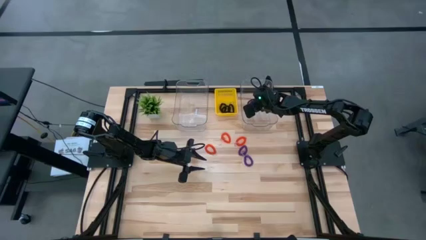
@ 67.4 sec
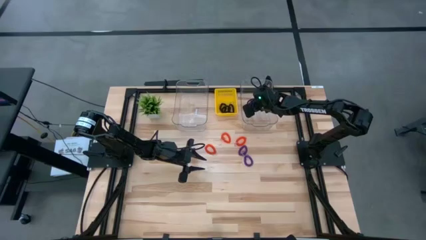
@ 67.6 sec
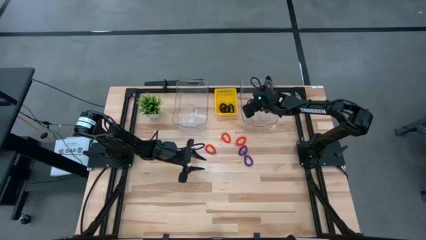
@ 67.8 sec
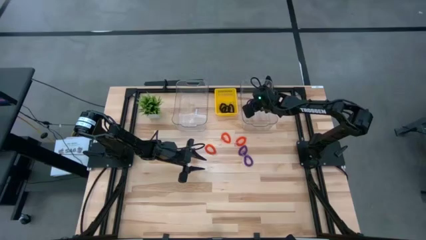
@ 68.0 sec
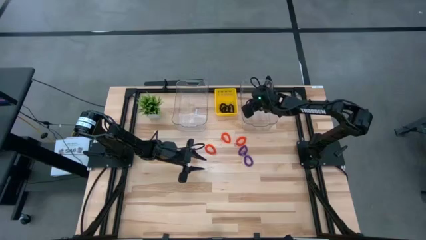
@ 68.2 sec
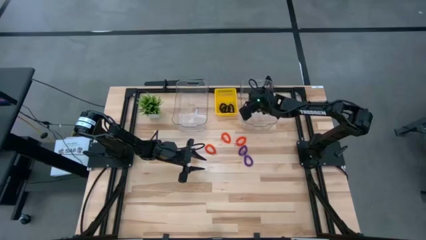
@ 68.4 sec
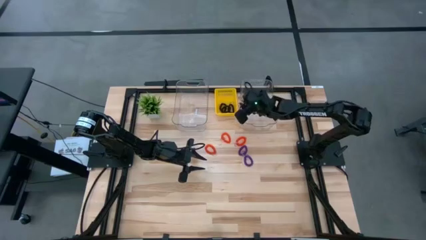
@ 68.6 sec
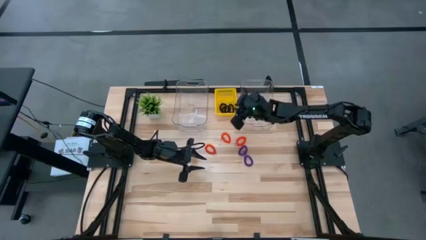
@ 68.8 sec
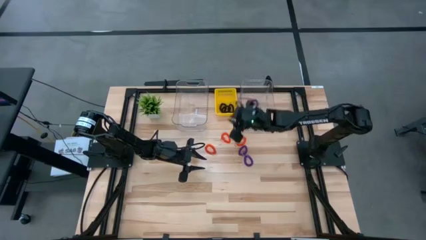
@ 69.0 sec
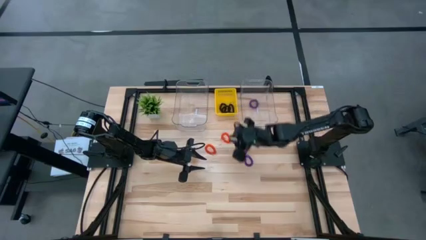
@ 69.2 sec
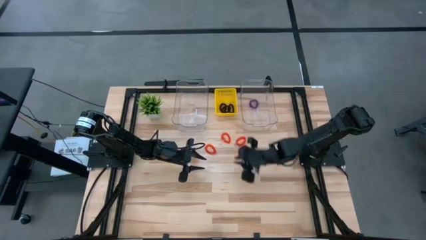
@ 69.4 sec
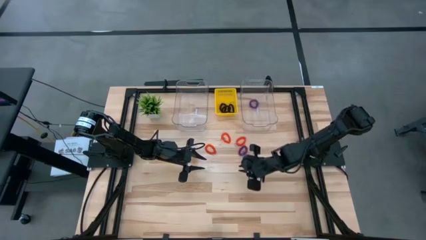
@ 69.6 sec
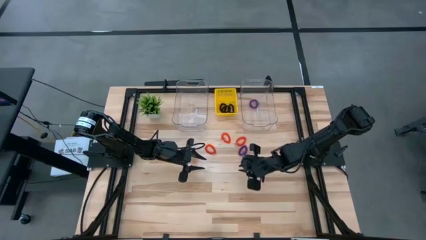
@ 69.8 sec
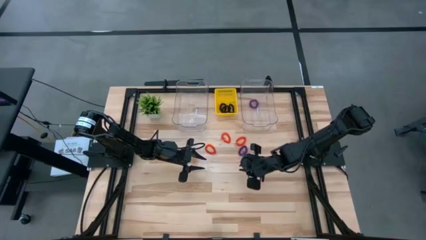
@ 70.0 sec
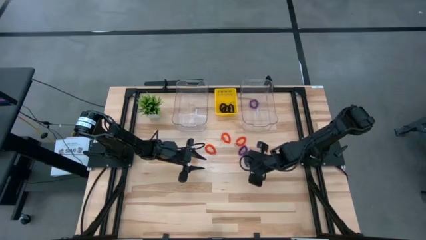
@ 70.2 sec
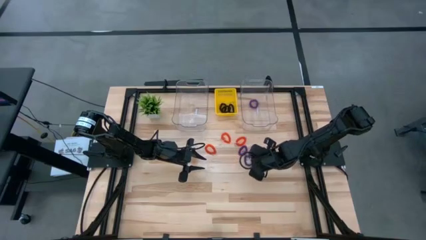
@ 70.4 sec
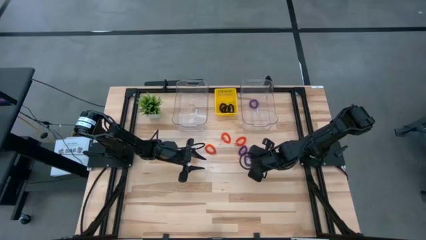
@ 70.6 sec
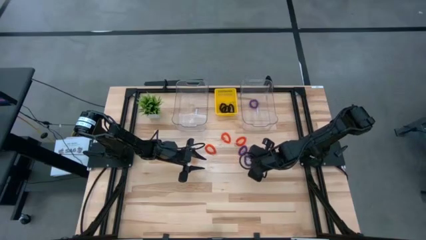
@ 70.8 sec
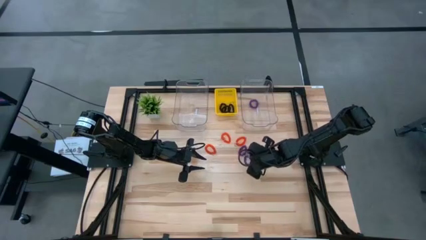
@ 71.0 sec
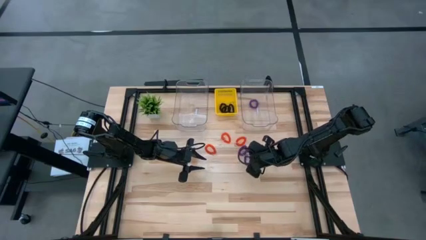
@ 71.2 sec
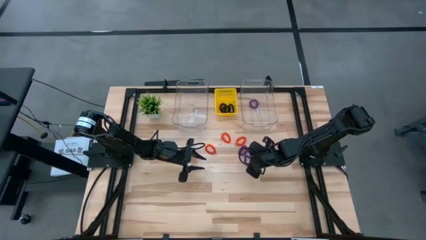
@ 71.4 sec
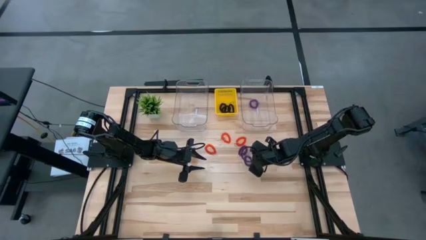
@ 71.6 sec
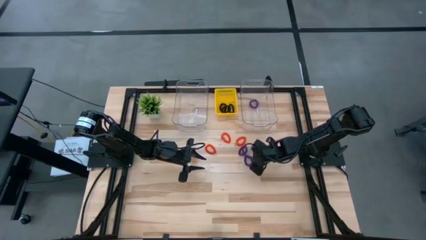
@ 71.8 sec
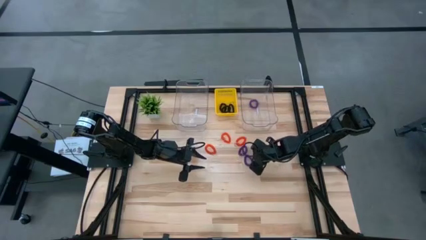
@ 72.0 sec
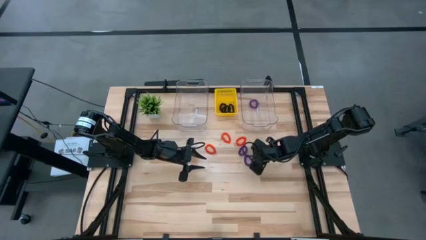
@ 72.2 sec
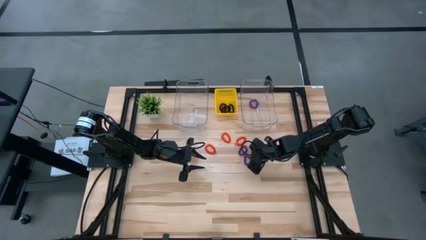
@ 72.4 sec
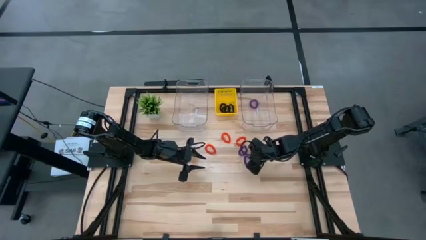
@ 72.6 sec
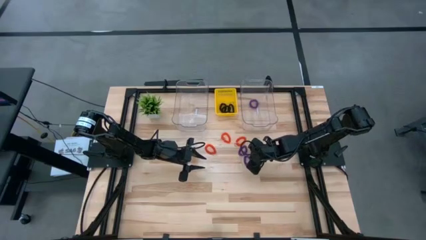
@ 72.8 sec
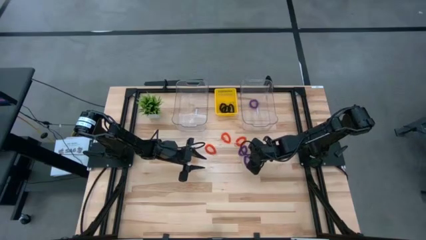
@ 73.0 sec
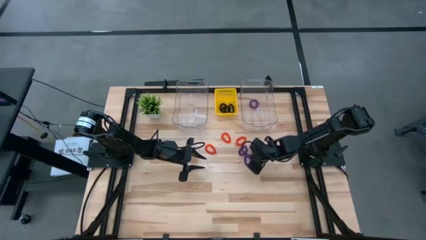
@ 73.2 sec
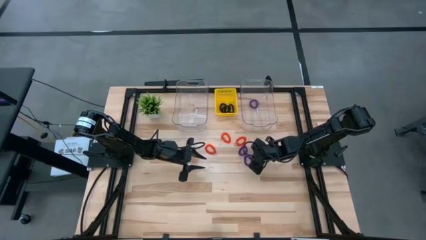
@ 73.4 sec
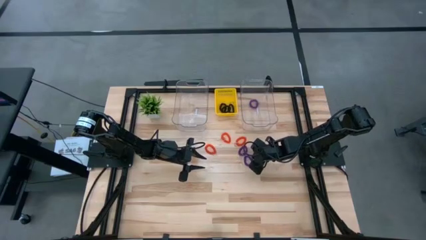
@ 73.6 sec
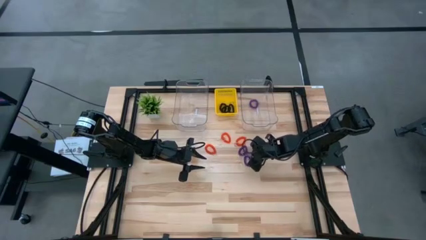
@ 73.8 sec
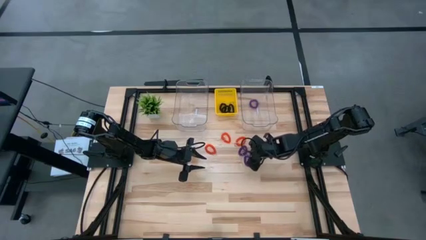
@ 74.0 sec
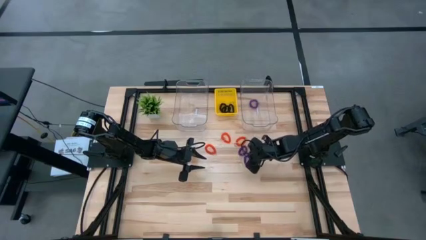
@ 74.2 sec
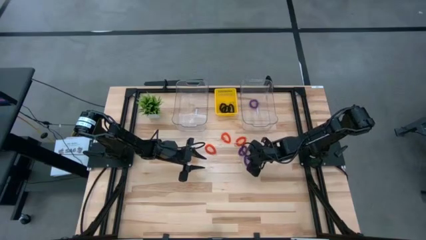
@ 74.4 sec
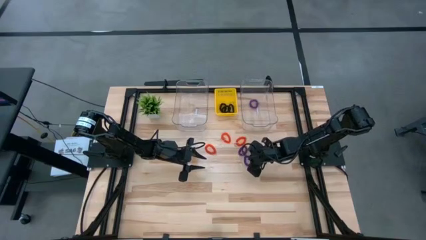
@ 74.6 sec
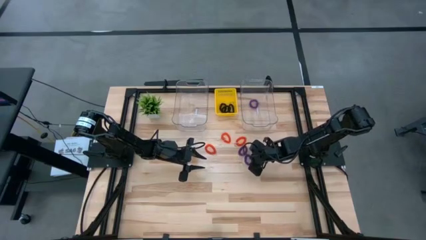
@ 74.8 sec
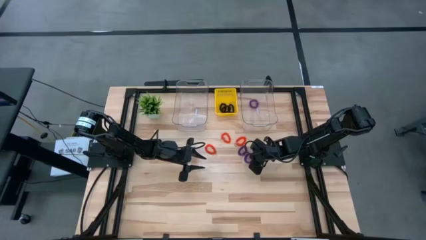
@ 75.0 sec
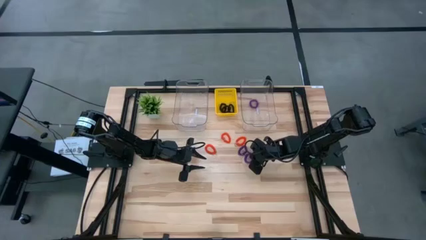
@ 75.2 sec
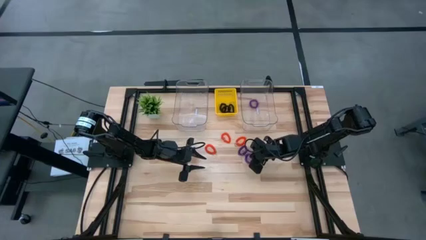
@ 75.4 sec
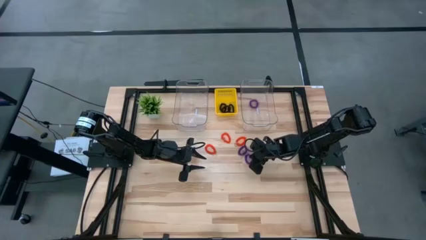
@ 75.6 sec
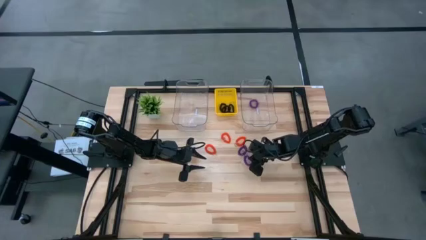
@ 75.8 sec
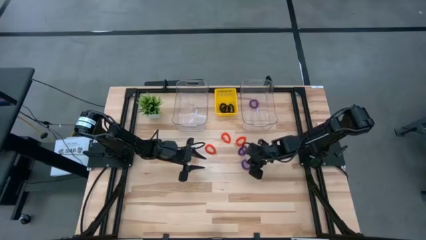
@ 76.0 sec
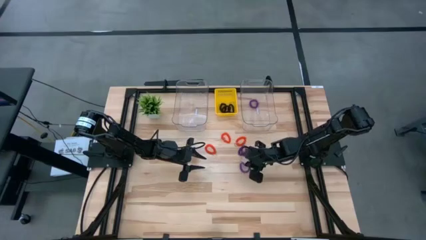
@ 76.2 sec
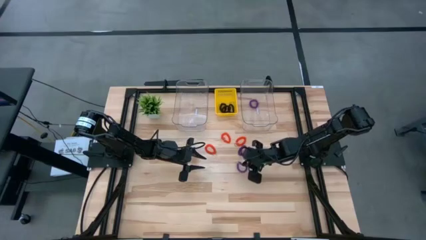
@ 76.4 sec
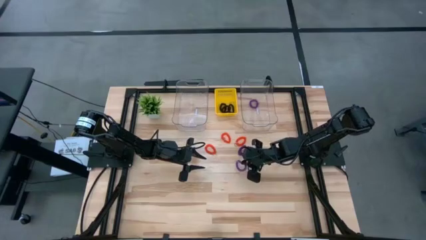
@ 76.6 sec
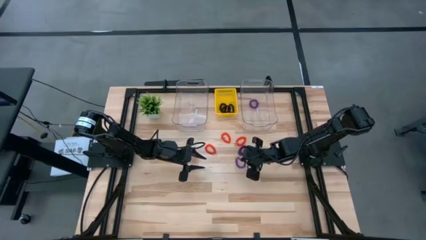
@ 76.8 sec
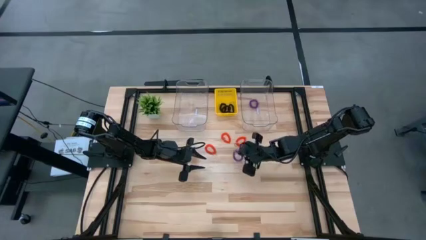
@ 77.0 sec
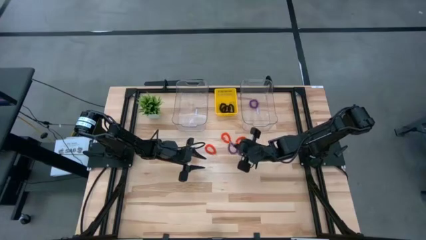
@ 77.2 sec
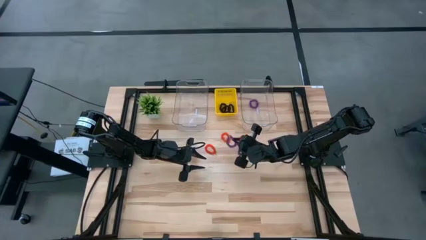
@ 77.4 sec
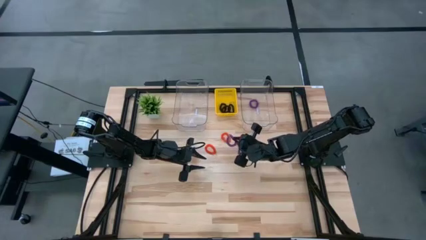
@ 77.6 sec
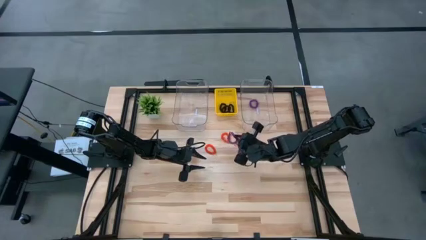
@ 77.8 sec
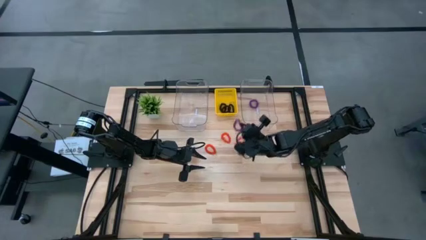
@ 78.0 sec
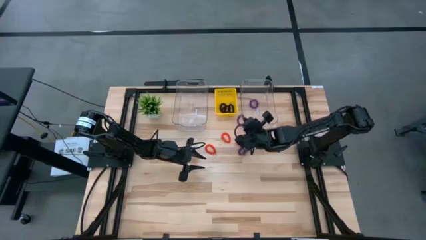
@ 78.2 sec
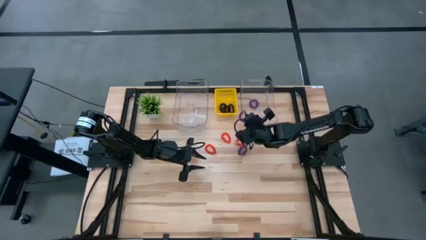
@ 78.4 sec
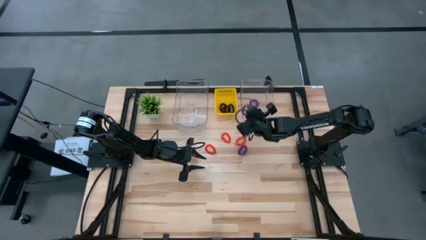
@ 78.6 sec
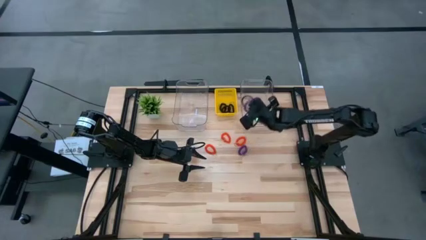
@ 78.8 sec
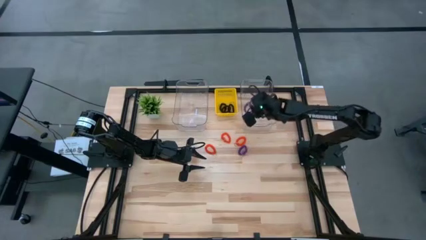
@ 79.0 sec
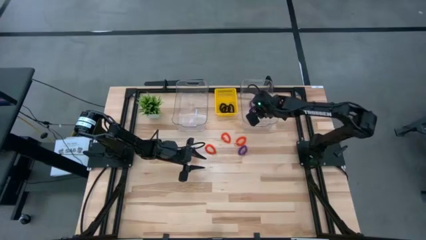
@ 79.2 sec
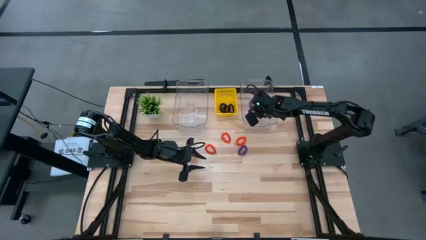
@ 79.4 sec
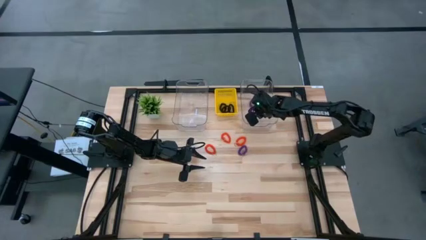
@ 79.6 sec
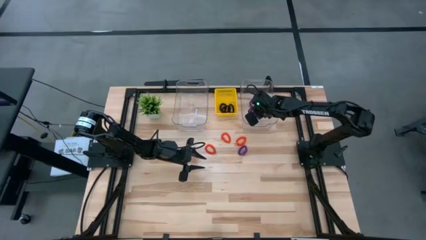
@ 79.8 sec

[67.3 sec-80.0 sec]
Task: Sort spring keychains
Put the bottom purple spring keychain into the right transparent bin

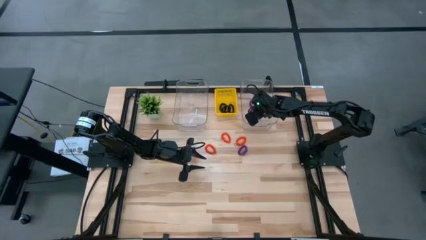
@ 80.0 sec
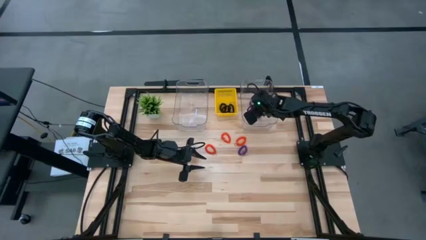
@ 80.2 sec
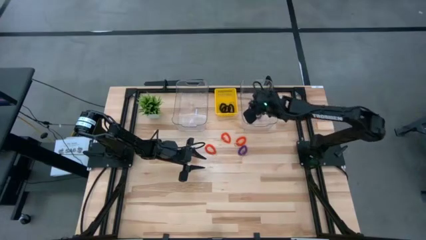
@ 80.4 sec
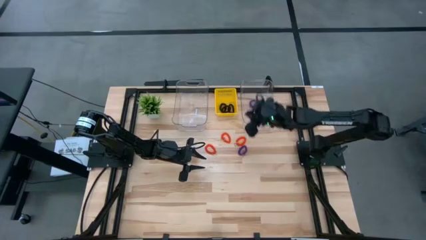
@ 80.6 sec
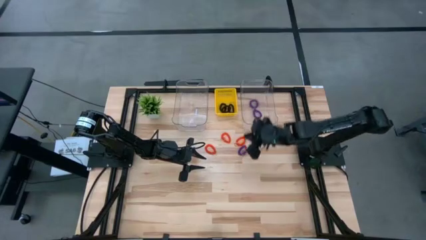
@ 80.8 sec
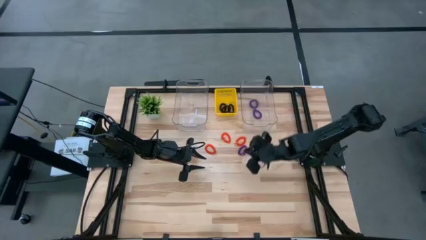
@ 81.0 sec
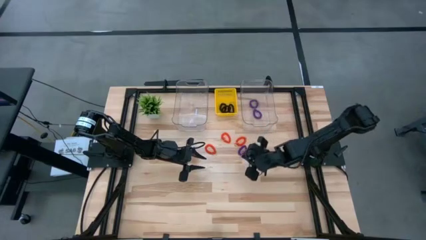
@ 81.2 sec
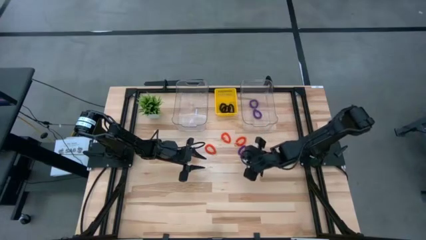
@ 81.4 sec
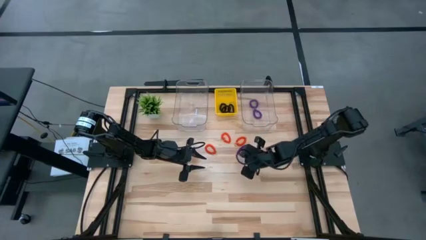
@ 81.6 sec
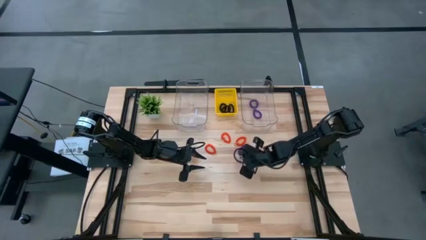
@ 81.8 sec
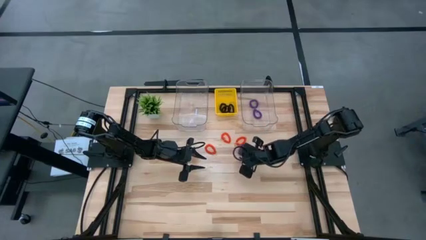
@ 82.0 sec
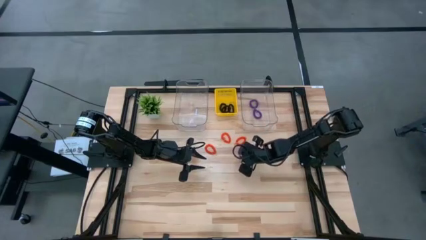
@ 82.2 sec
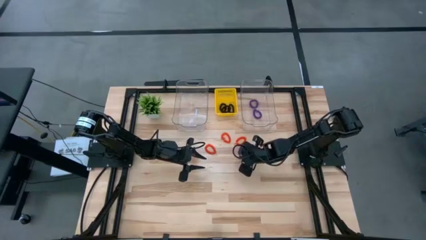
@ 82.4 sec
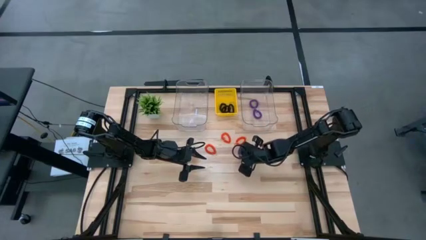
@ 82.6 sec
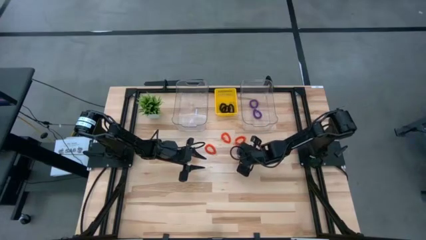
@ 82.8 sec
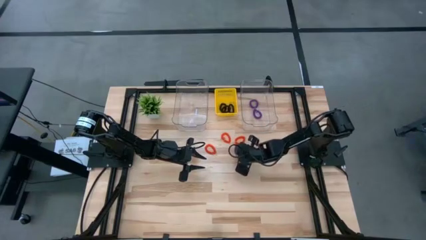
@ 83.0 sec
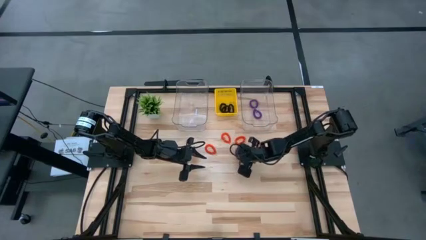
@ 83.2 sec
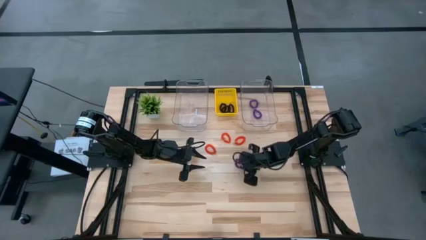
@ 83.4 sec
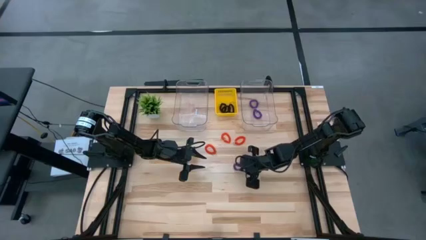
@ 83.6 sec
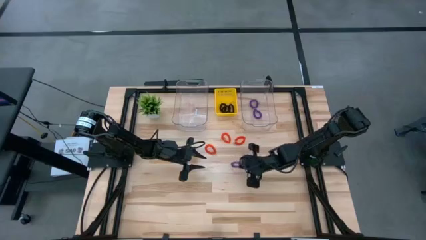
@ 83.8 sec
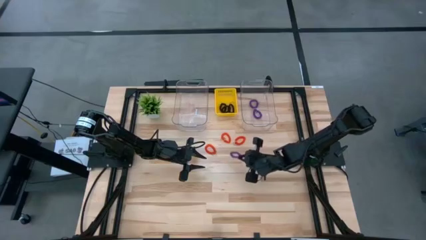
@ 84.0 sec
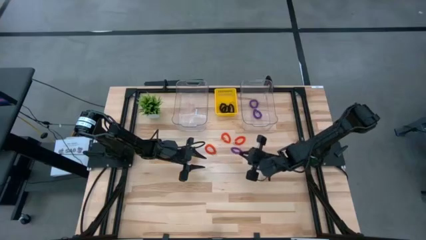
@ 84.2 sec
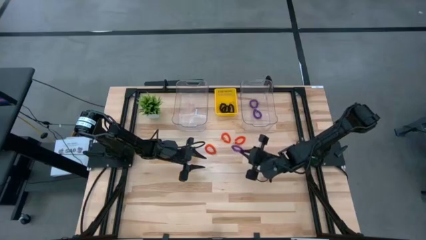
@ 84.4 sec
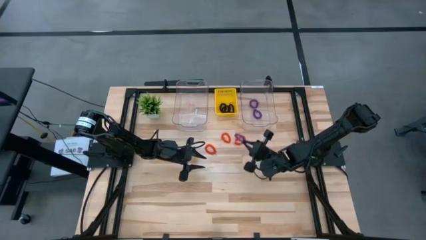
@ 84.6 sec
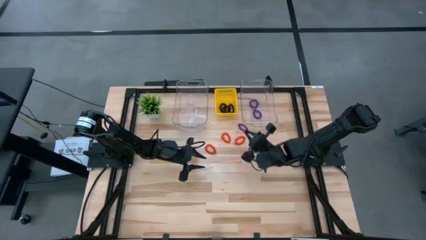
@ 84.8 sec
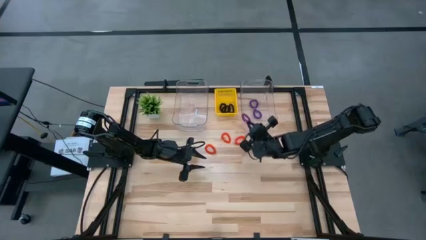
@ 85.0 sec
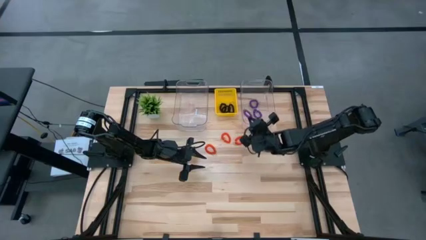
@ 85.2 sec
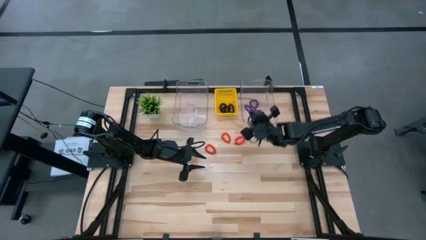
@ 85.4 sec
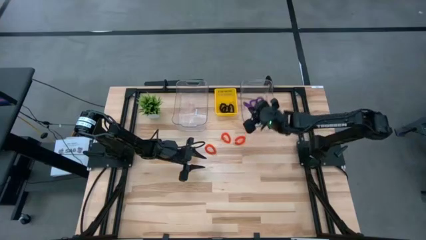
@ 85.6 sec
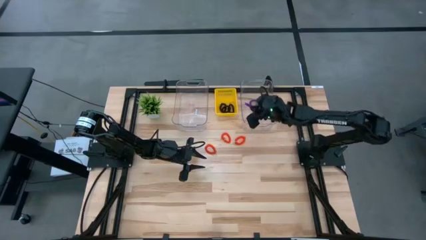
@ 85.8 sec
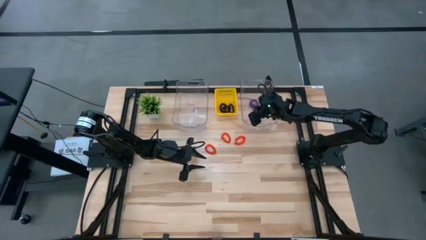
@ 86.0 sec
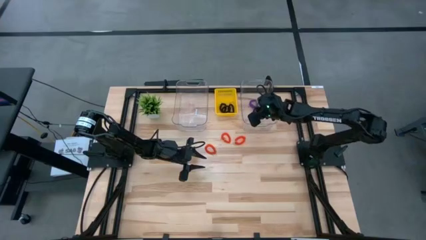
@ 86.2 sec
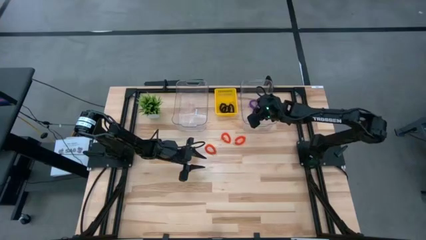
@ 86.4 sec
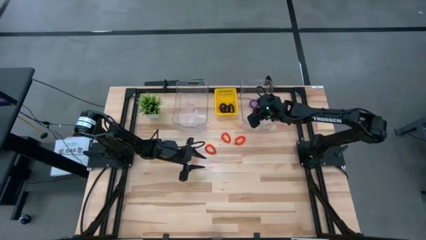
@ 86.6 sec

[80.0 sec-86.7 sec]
Put the purple spring keychain into the right transparent bin
